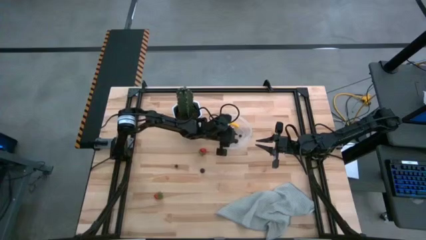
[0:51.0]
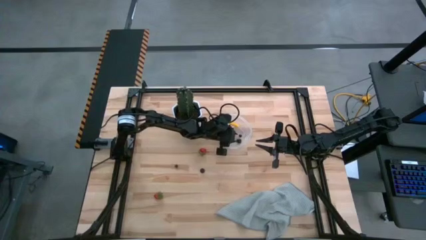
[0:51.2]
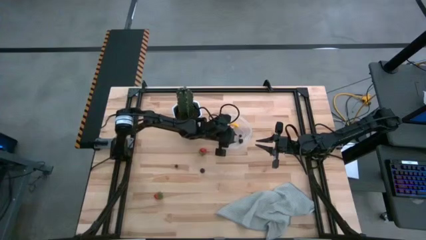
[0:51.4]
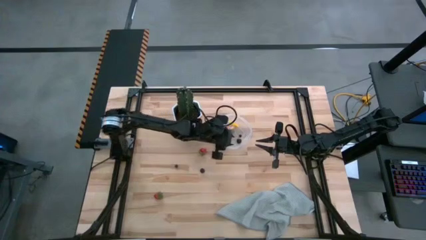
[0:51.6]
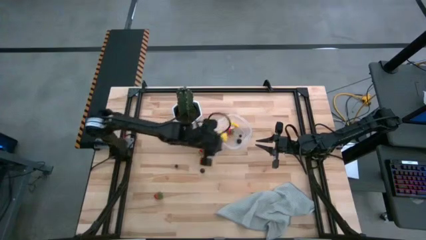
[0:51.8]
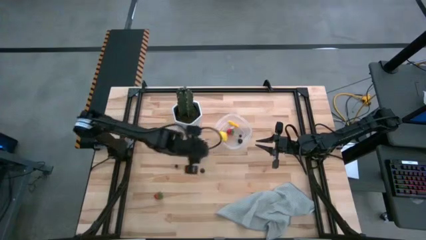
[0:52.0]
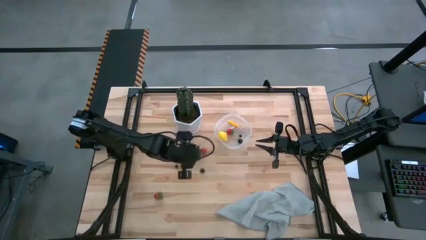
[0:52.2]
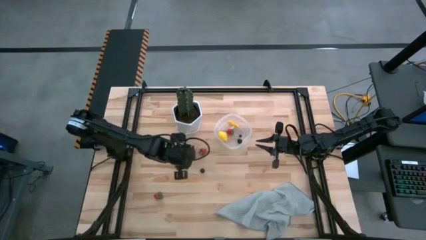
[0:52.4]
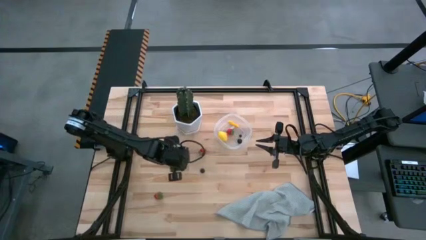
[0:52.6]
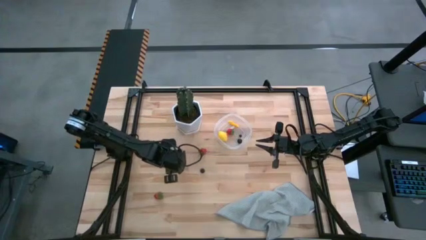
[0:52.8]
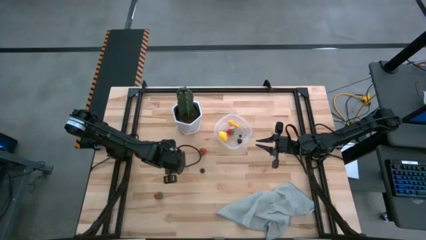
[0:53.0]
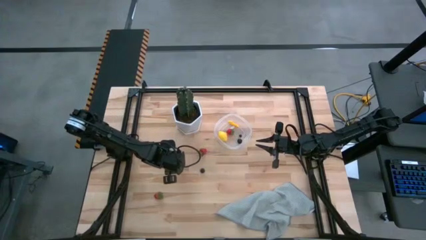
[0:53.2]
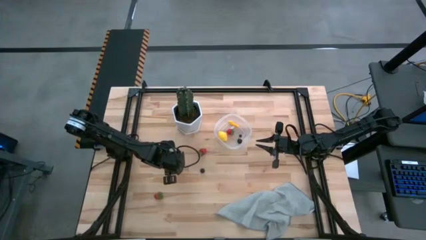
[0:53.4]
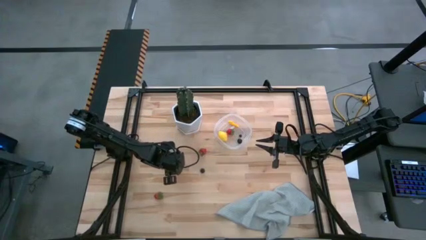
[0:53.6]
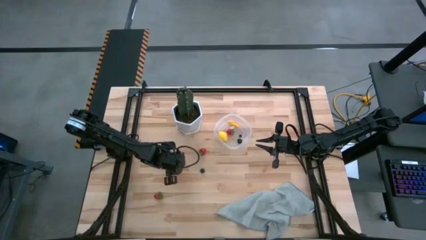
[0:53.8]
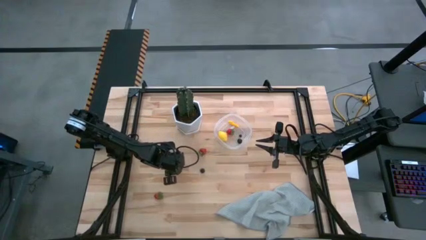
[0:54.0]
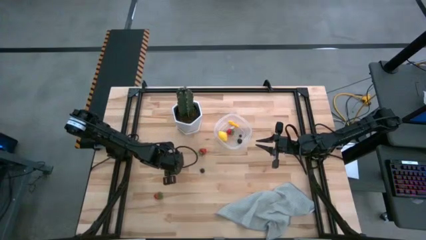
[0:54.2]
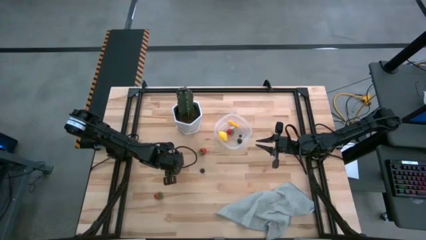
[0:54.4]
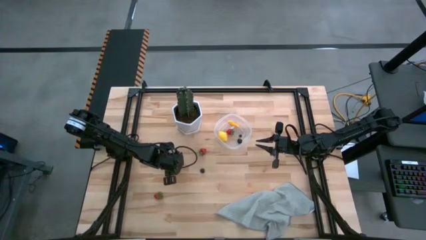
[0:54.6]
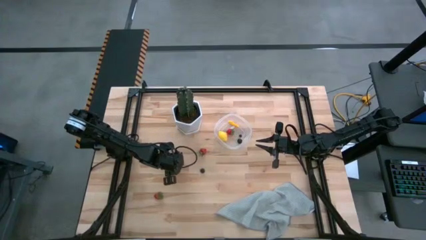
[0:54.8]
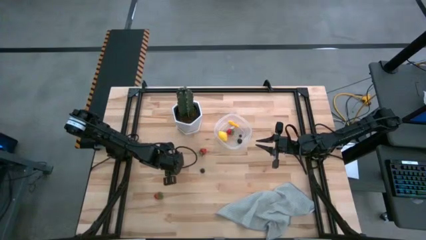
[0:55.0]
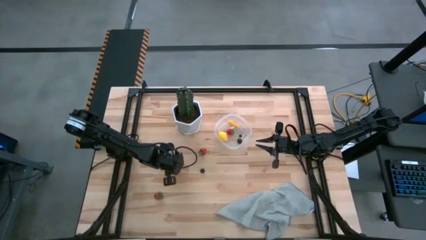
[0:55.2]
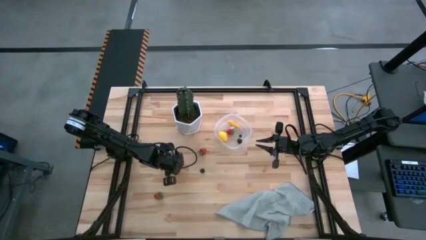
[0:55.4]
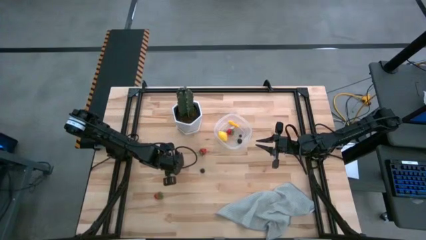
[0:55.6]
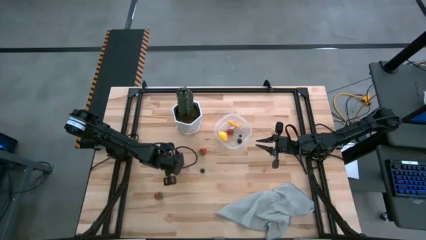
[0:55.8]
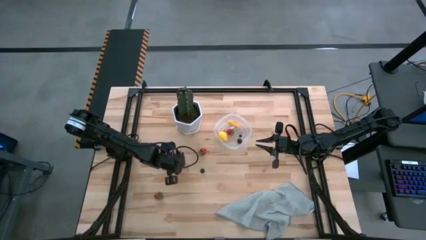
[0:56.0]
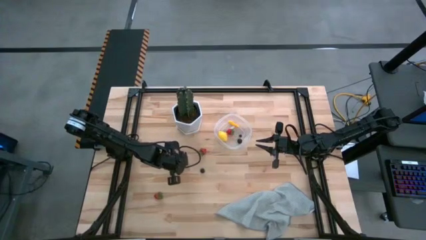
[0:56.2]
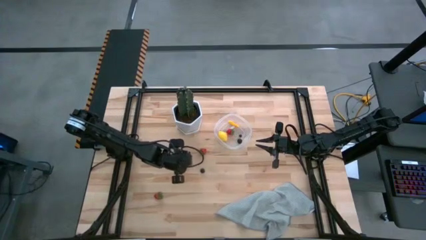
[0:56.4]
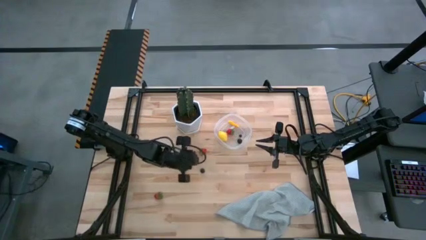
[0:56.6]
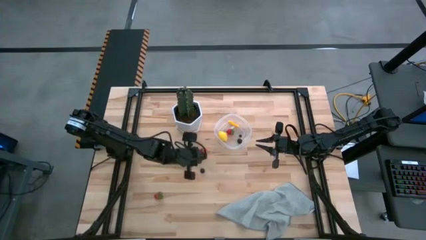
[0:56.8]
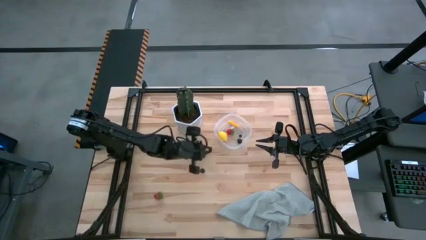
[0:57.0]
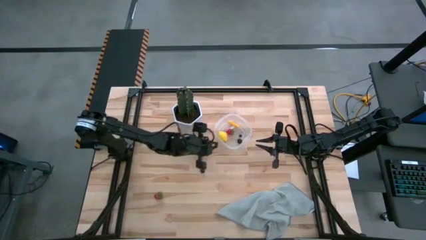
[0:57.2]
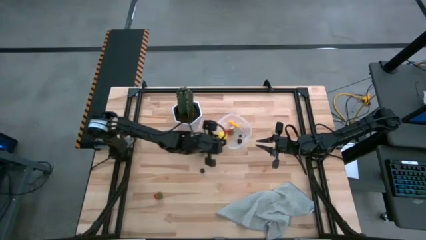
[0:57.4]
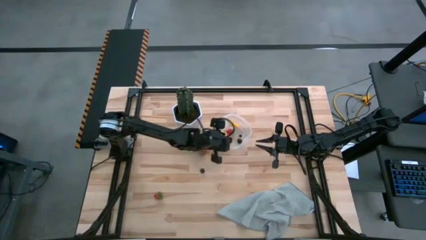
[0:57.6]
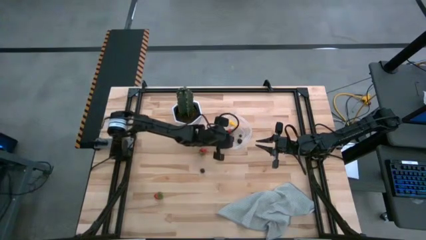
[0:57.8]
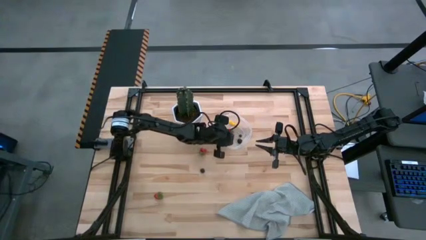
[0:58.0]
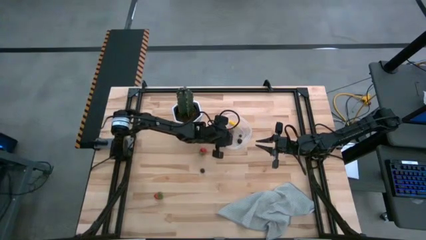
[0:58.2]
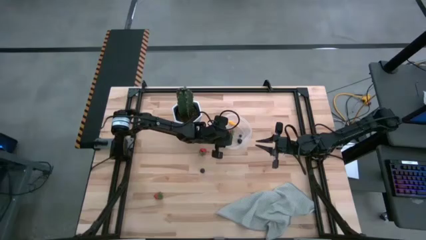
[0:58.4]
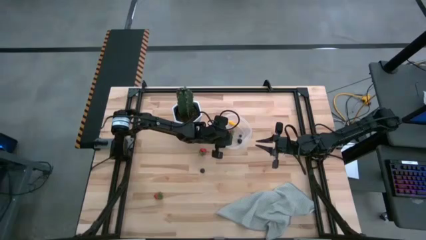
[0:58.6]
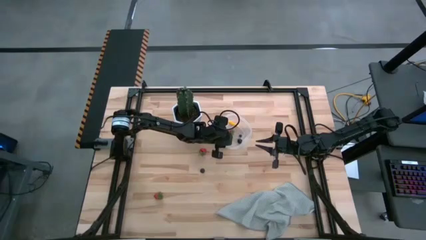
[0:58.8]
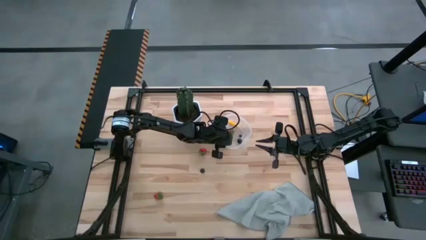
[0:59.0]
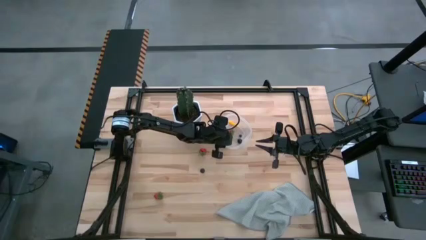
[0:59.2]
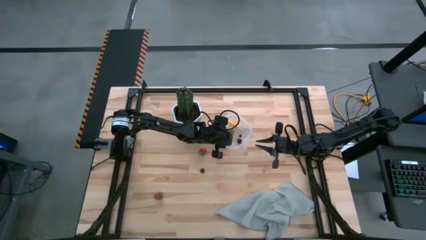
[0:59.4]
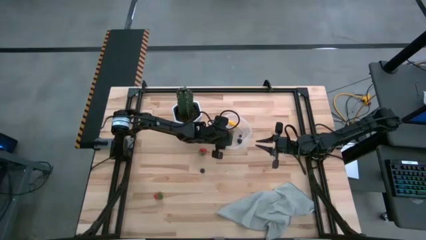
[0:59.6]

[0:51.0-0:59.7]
Task: Pick and placing Produce into tupperware
Put the blueberry into the transparent container

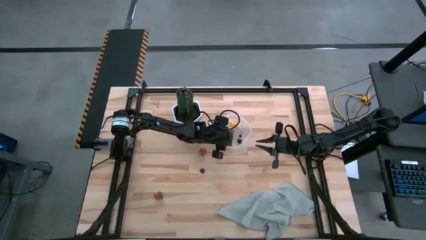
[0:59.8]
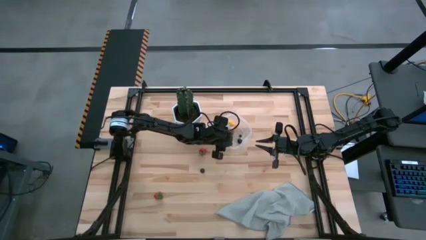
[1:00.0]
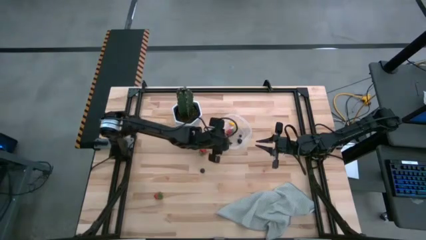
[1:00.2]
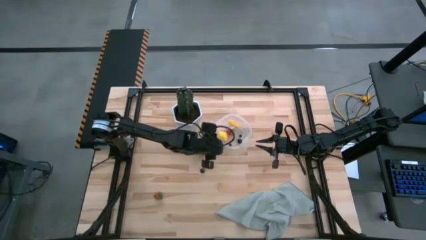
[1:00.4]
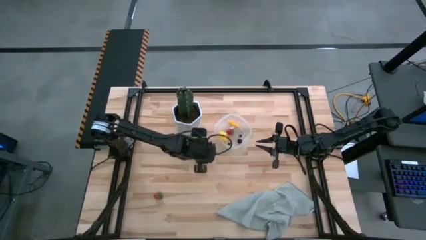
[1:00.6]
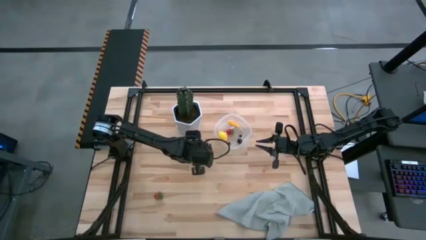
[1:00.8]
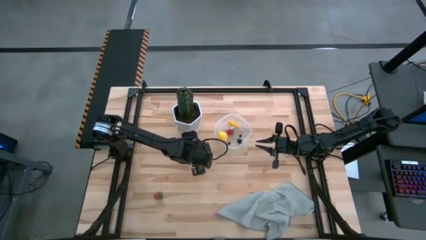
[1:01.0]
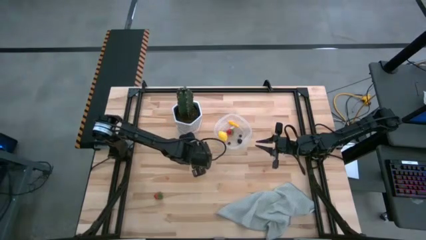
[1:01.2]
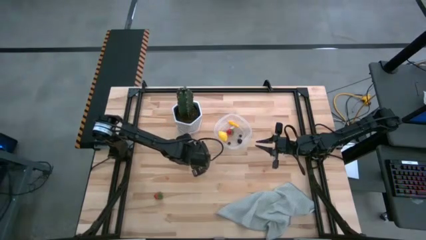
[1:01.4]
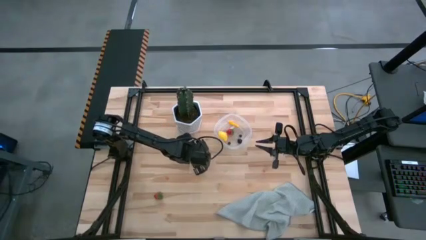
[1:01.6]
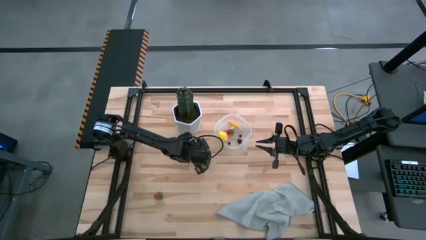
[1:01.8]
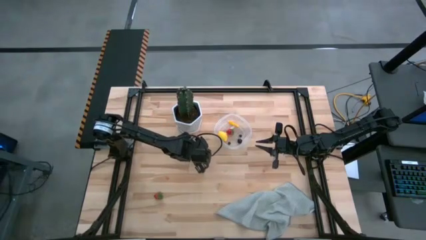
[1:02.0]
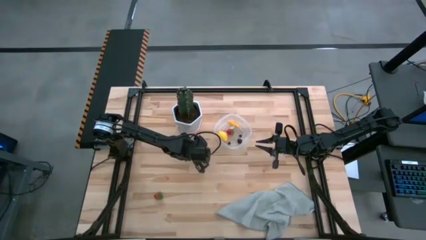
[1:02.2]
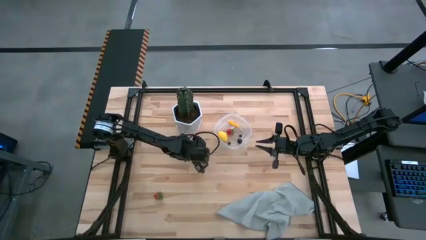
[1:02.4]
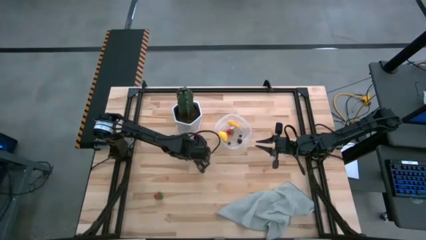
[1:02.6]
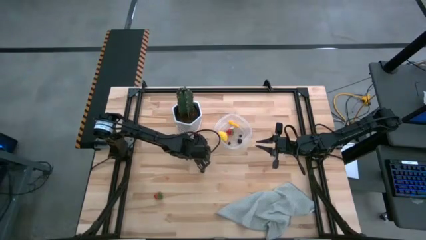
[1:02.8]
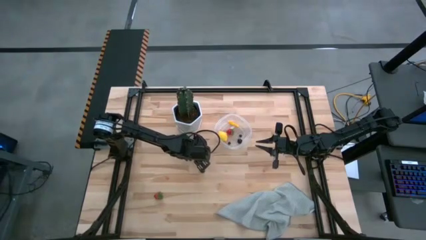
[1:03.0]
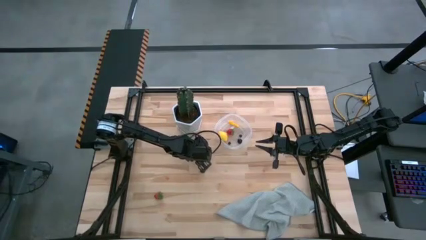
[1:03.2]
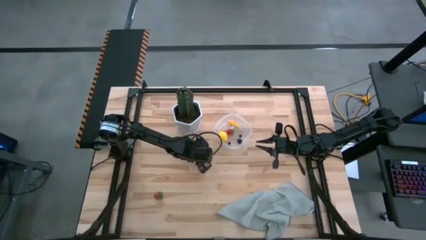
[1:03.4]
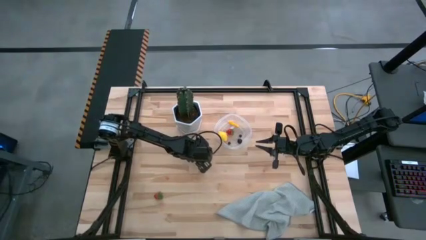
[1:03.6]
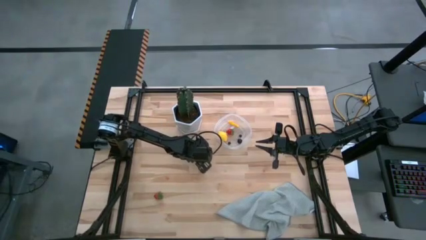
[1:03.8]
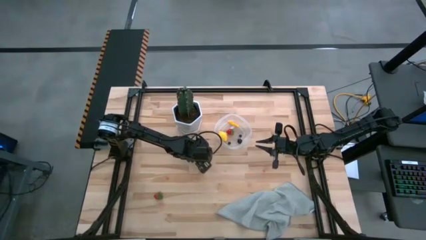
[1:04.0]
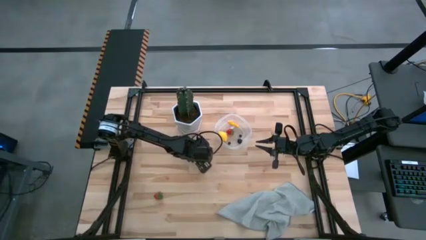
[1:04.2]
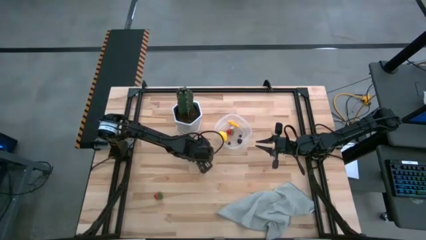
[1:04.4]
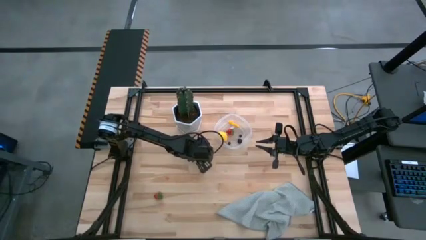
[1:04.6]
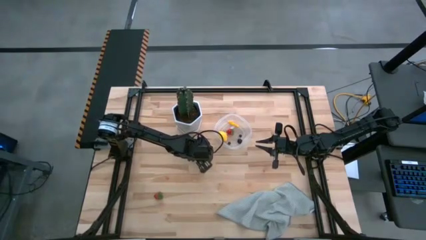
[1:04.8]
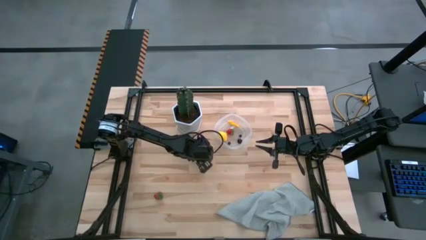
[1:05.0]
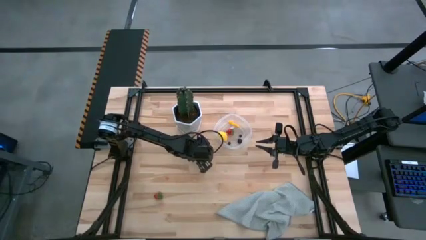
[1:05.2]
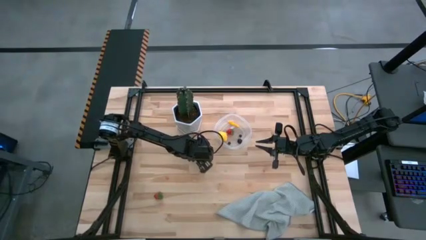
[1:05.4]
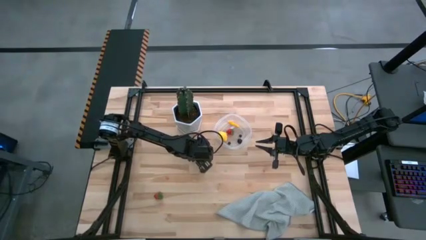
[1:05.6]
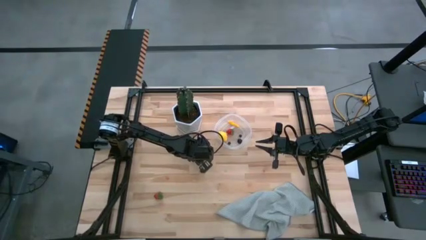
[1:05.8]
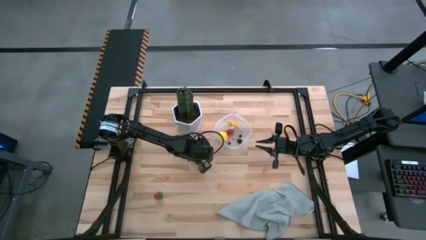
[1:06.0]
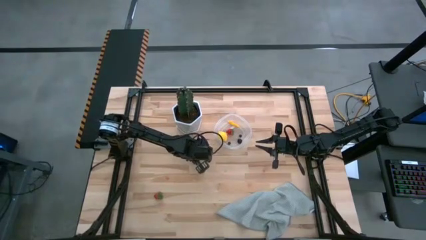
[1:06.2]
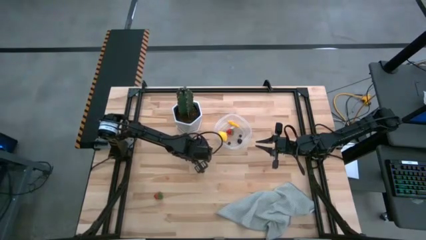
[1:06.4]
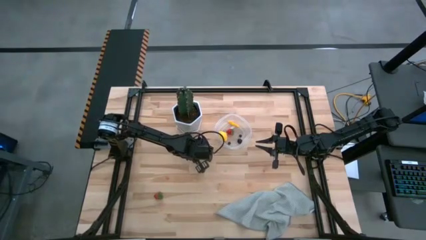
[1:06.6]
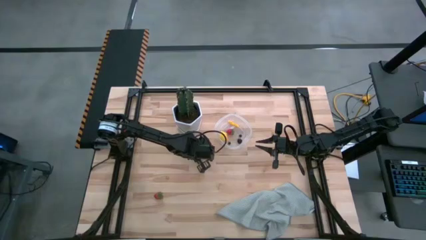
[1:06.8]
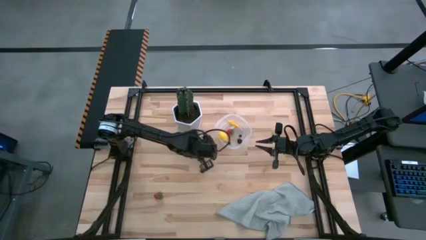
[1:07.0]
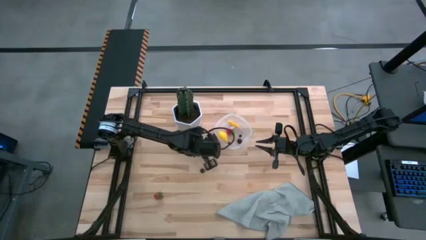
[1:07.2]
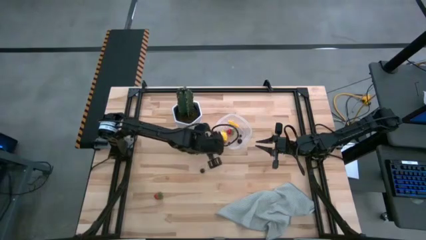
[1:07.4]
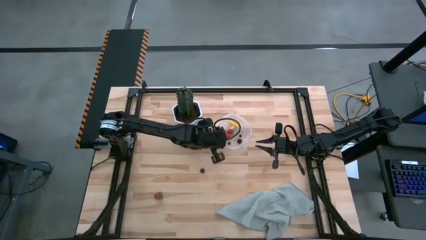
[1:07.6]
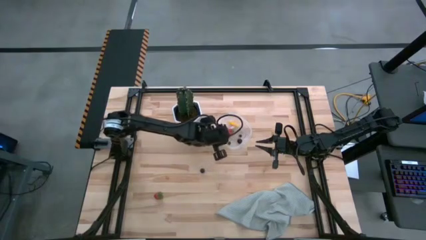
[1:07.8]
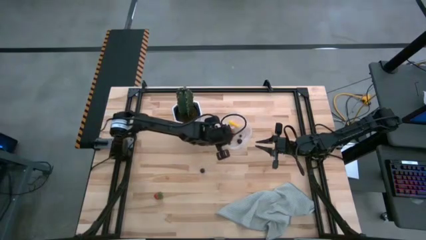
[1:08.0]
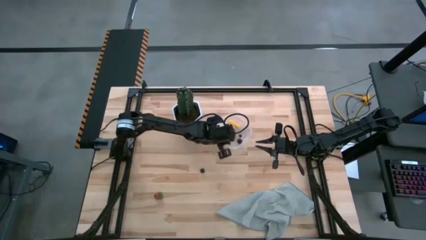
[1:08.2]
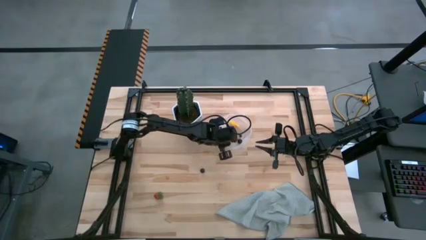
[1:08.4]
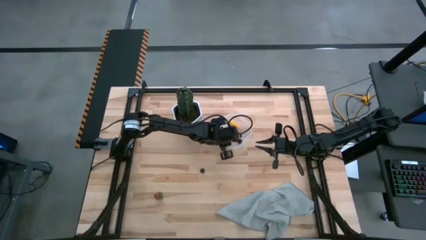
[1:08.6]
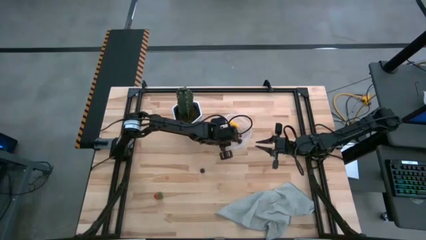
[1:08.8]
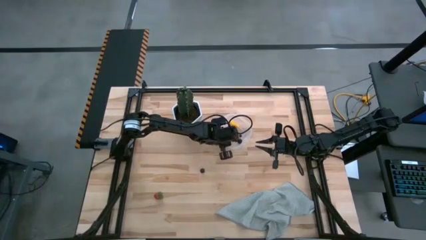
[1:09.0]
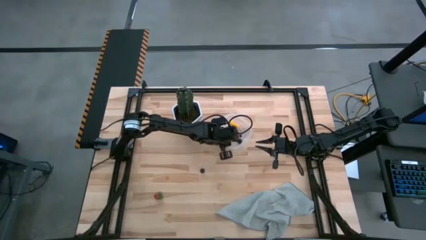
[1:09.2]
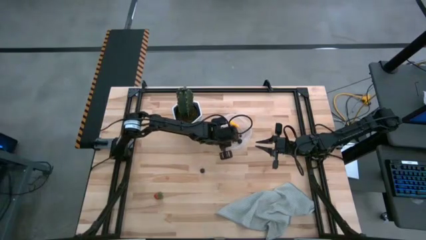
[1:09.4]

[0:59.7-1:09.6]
Put the top red strawberry into the transparent container
